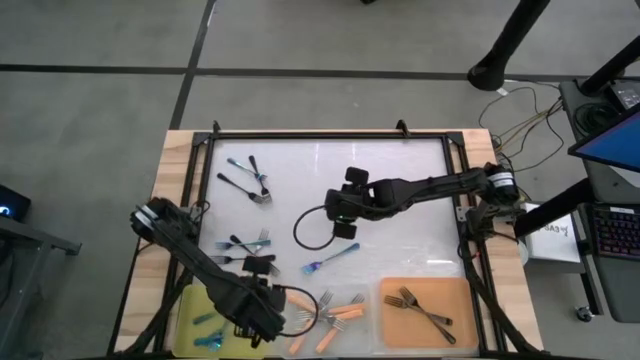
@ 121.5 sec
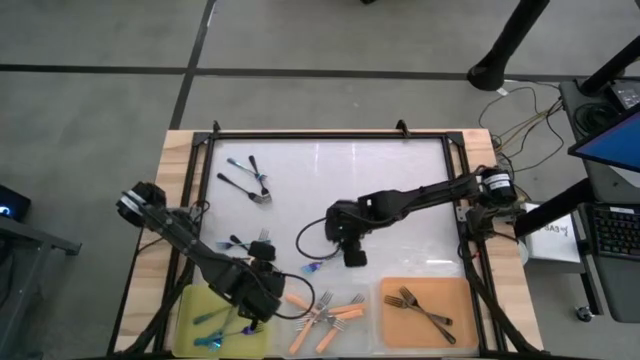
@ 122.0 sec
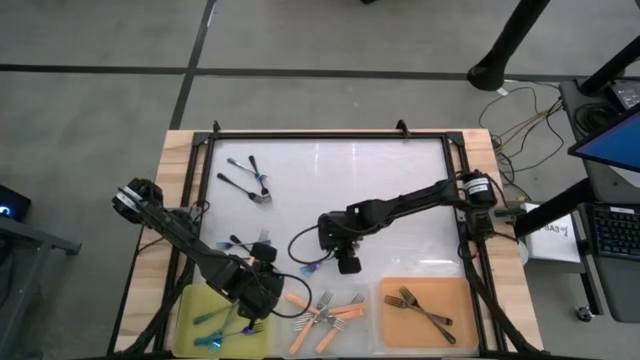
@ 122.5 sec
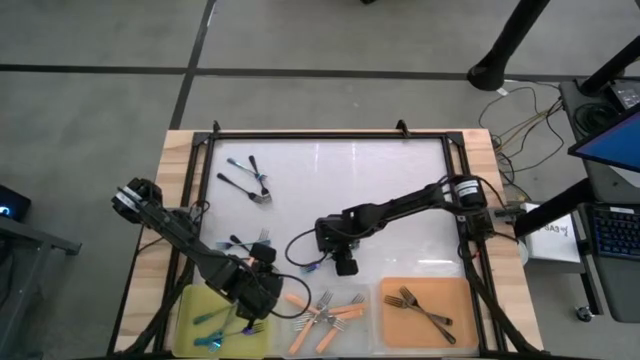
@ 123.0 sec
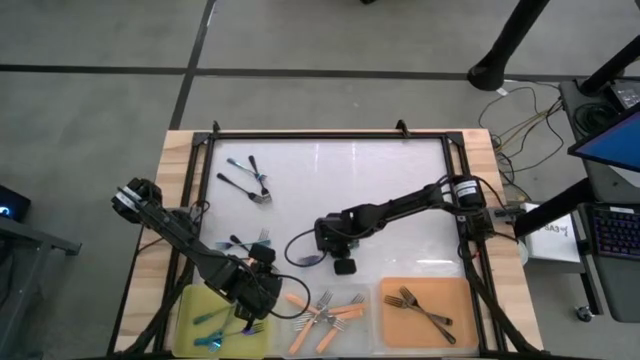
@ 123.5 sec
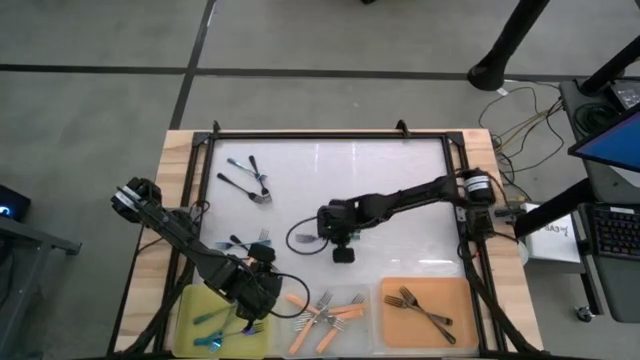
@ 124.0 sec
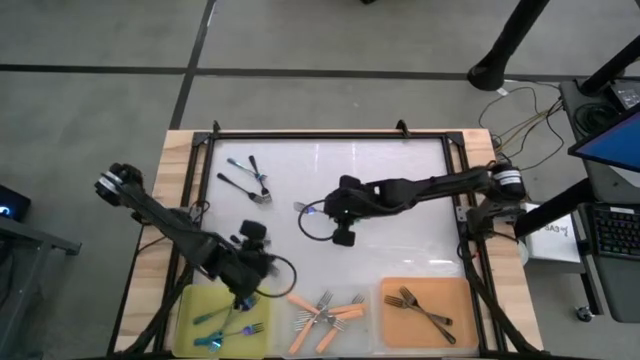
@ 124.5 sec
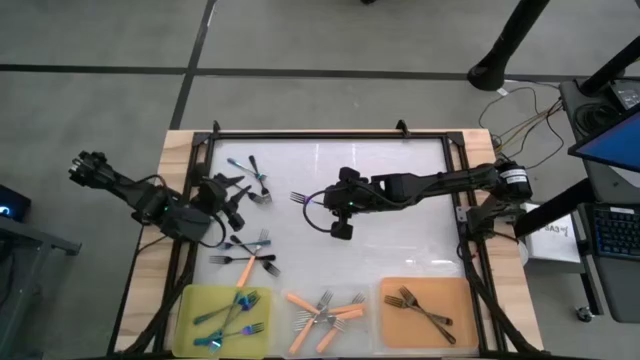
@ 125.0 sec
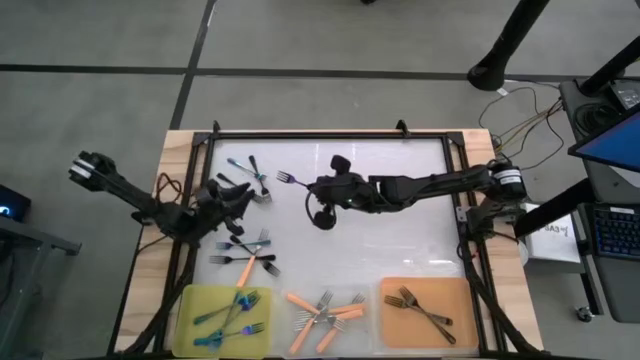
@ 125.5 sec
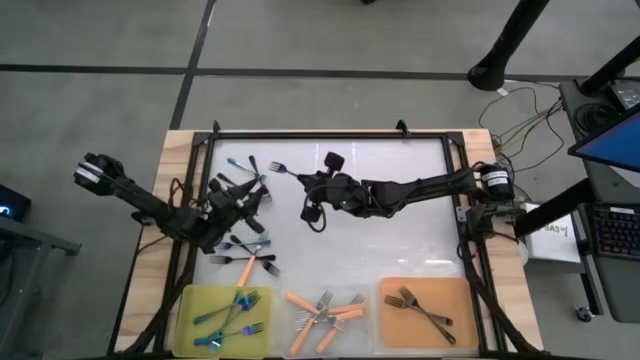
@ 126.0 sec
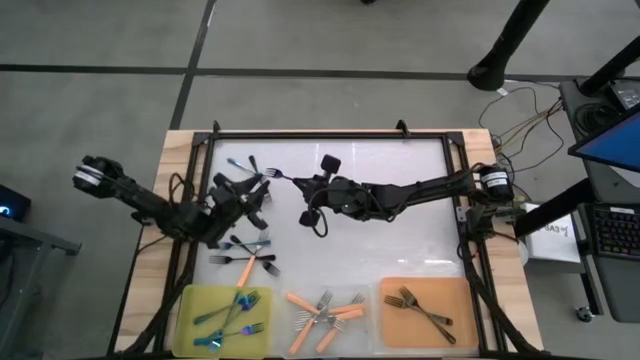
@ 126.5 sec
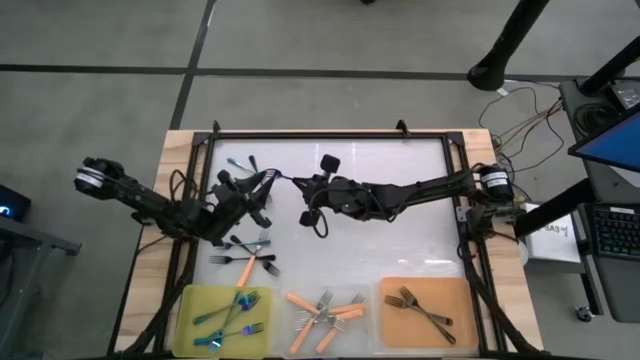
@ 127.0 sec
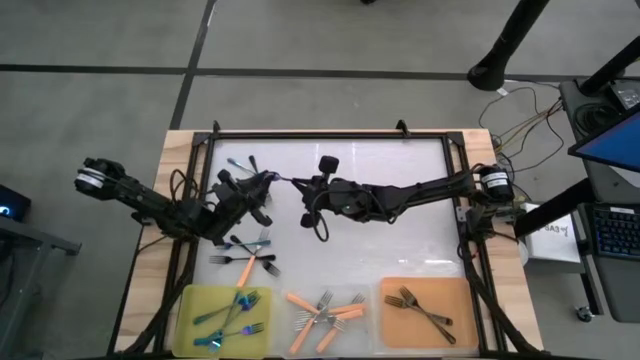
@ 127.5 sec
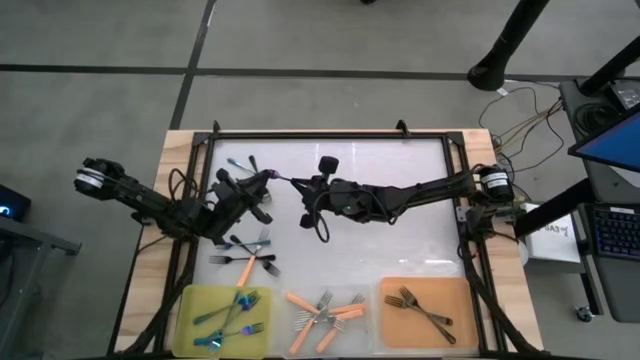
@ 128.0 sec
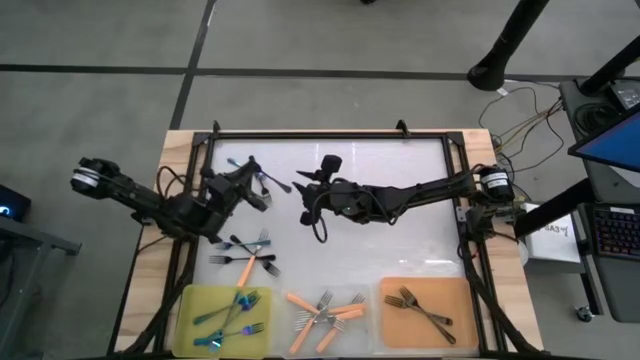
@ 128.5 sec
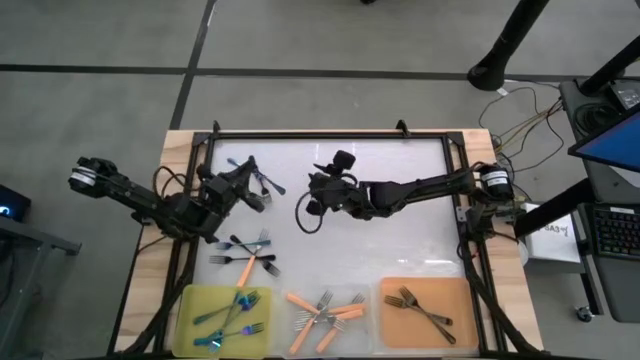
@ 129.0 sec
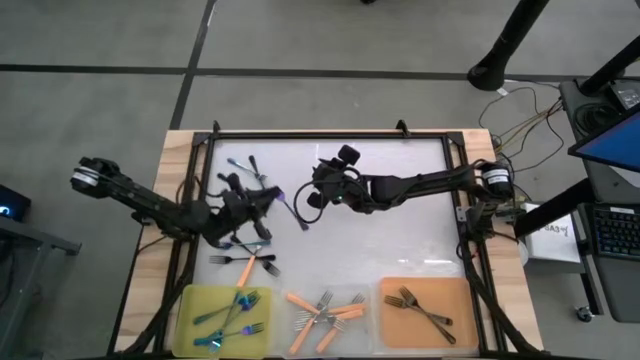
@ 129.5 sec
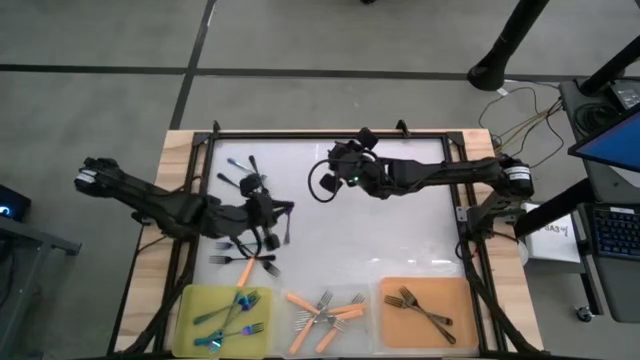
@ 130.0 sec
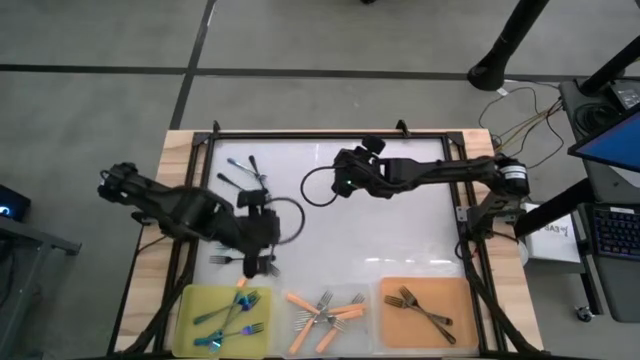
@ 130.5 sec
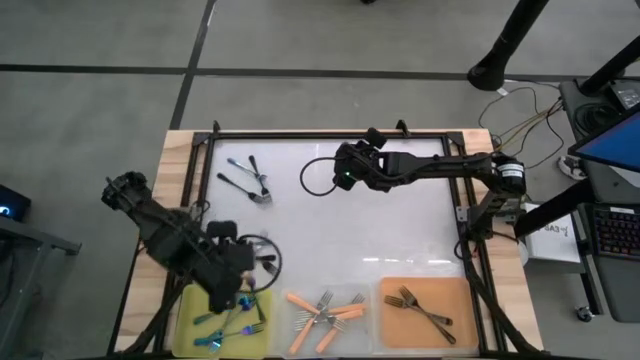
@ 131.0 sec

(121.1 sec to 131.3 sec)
Task: Sort silverware by color (type)
Put the blue fork into the yellow bin

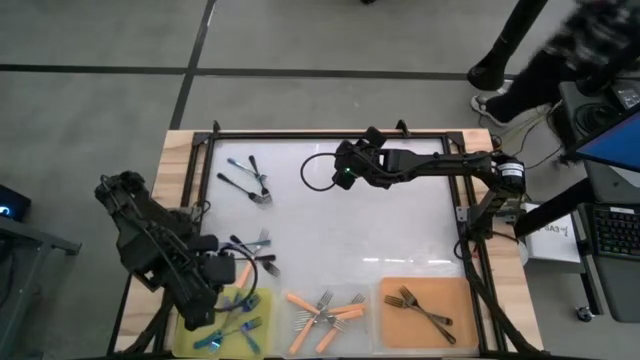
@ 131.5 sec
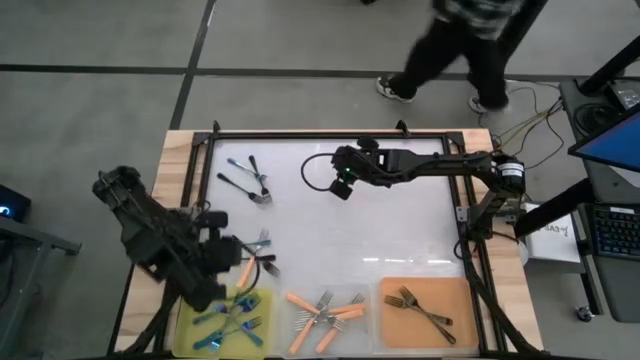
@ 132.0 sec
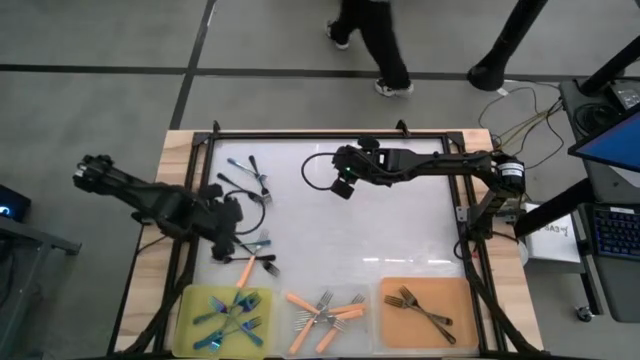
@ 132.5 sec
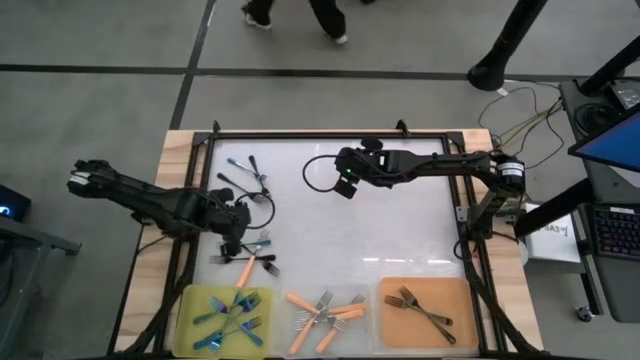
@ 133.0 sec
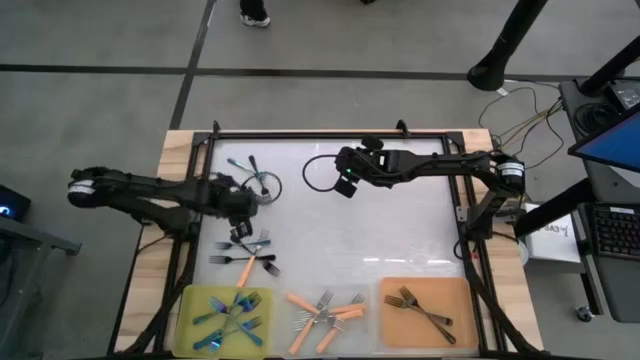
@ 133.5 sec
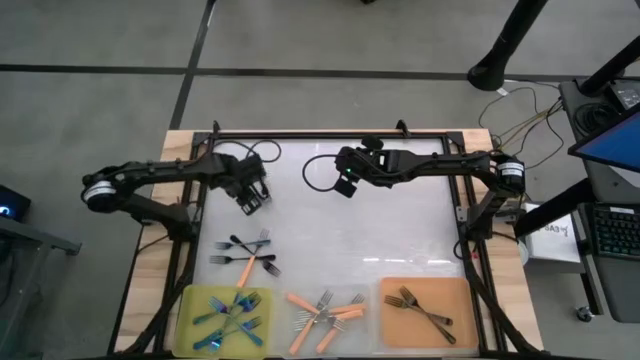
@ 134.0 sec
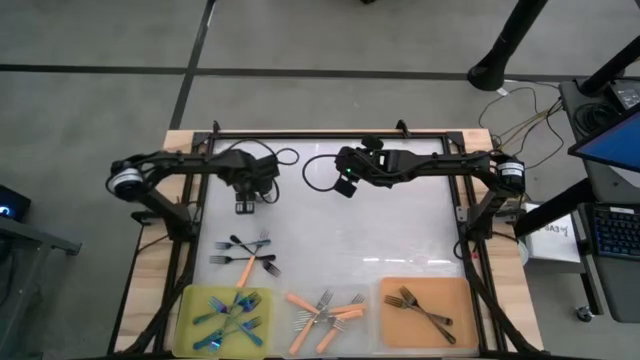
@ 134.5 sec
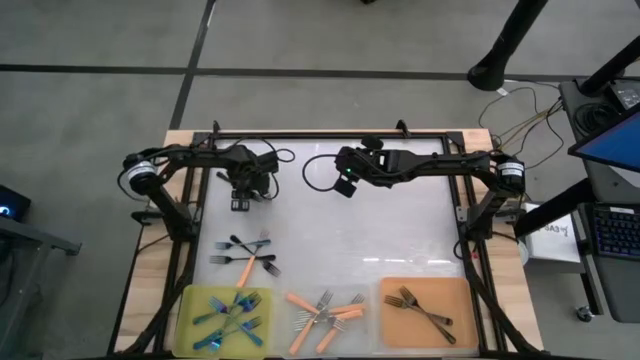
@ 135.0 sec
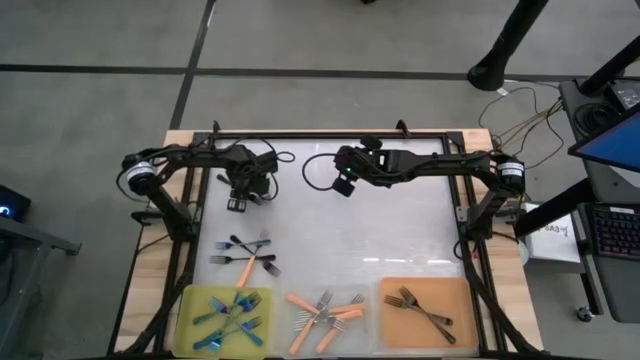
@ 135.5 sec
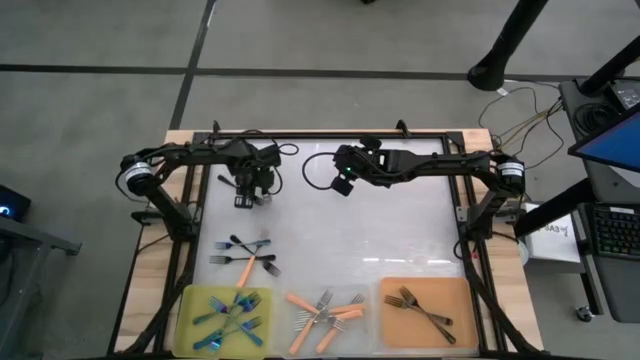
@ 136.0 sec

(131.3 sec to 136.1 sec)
Put the black fork into the orange bin

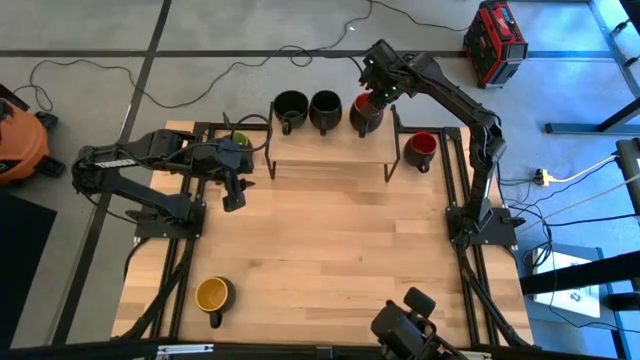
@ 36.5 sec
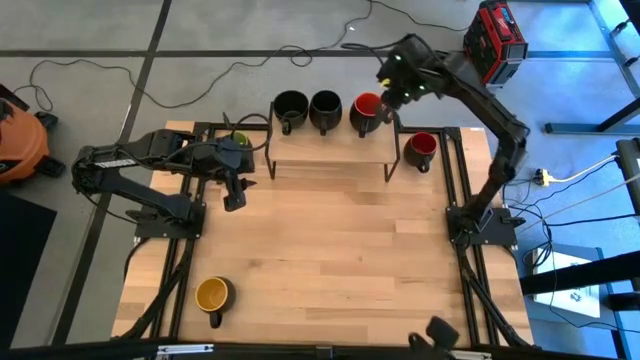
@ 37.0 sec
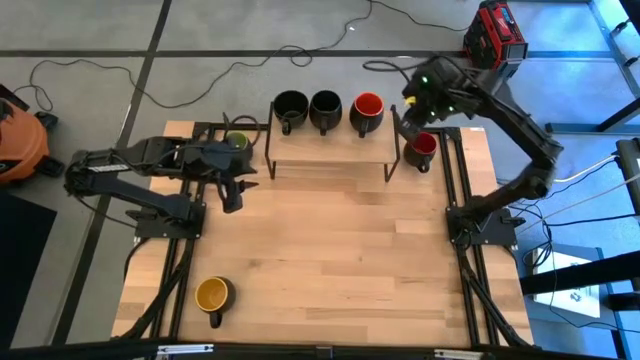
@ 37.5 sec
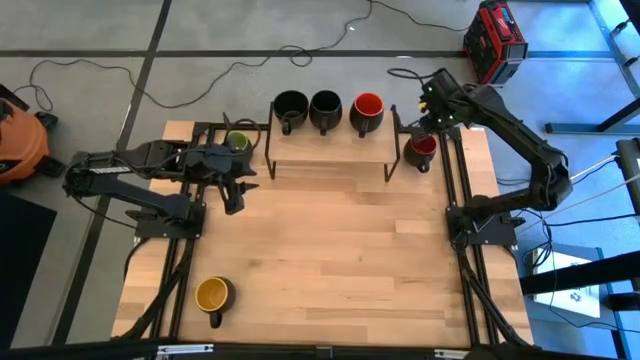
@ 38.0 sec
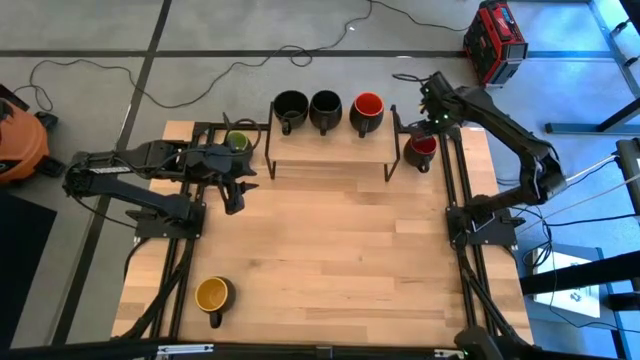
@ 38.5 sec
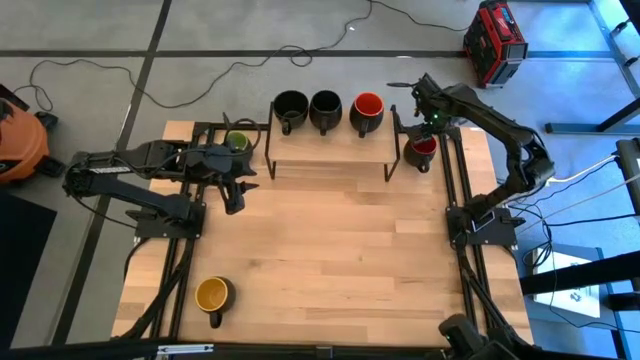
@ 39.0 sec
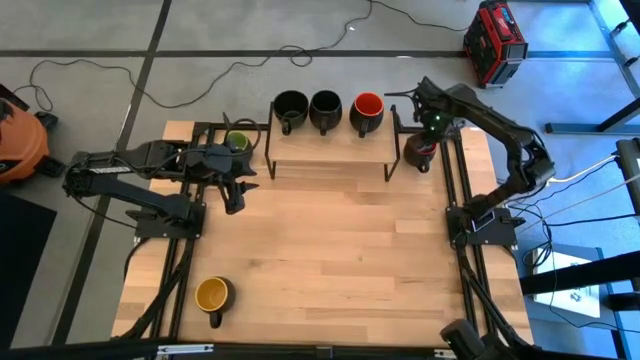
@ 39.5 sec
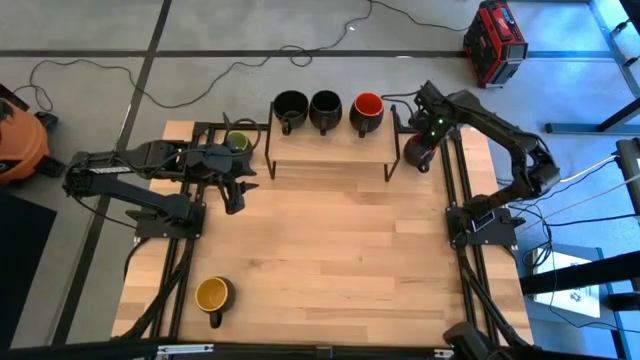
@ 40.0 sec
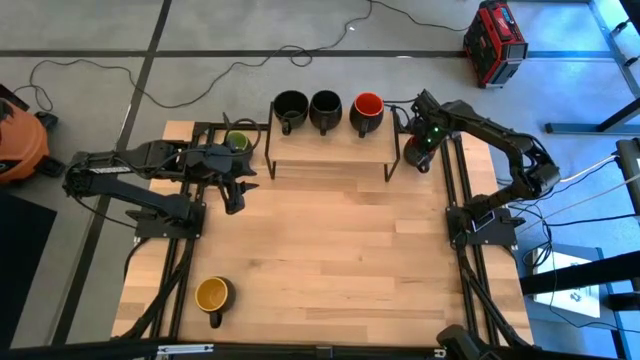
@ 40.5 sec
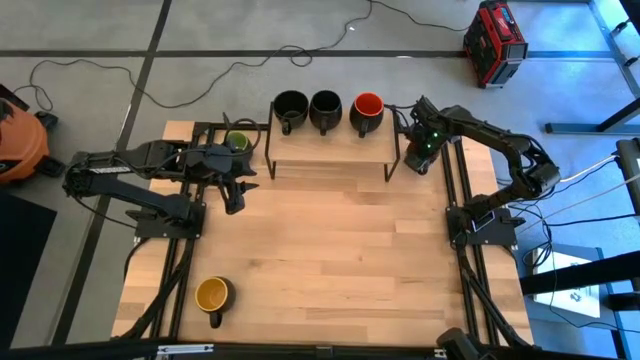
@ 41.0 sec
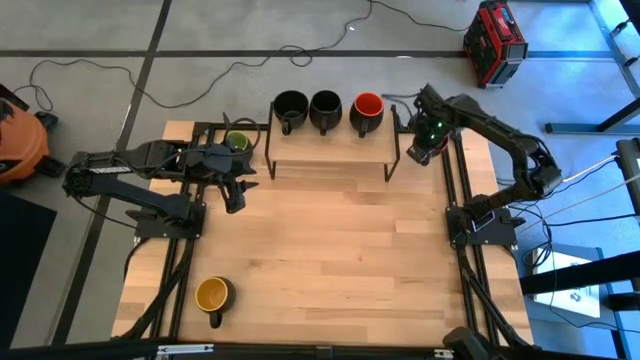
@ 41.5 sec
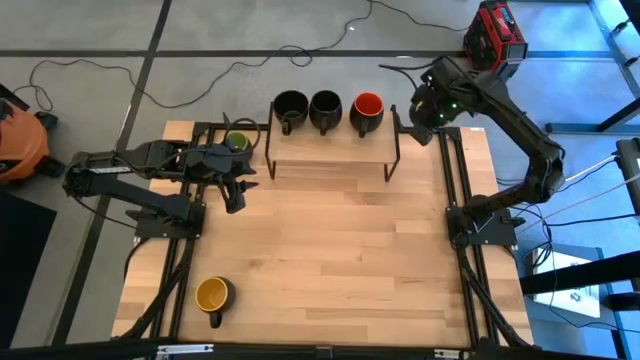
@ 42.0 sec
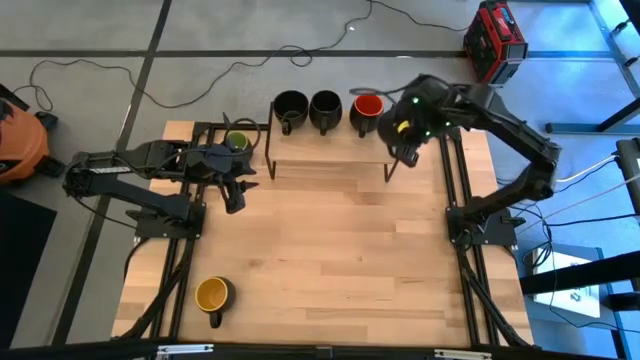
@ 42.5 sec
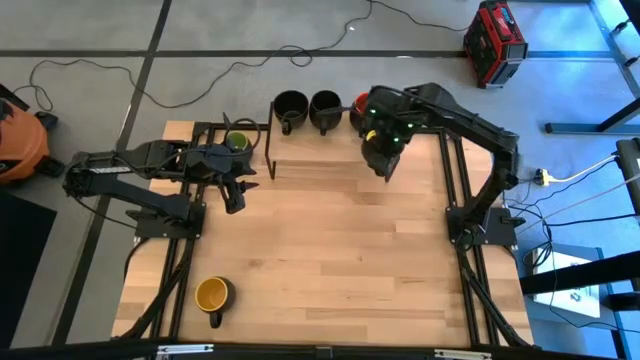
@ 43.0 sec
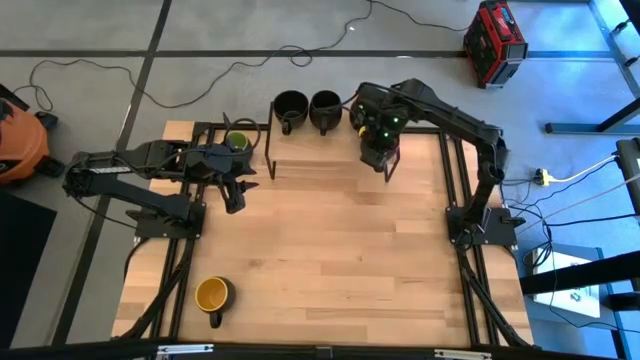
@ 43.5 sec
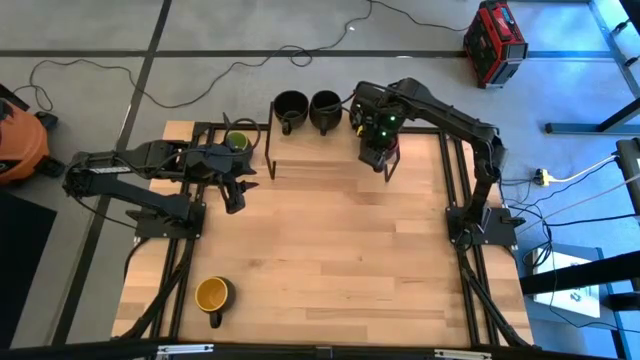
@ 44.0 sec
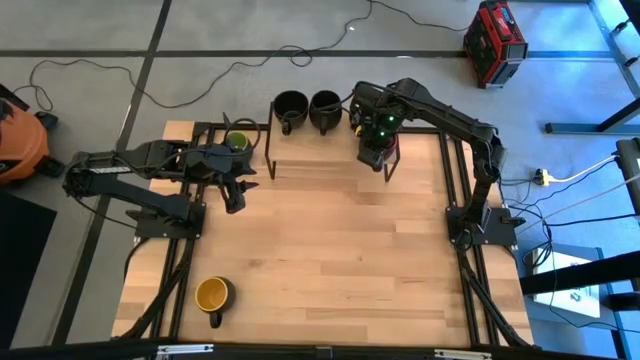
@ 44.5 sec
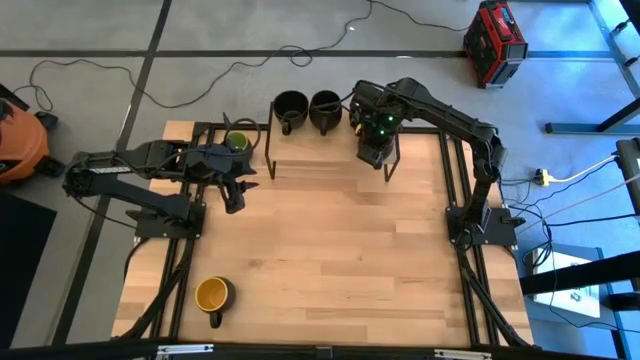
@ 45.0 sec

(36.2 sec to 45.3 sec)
Task: Place coffee mugs
Put the top right red mug on the shelf
